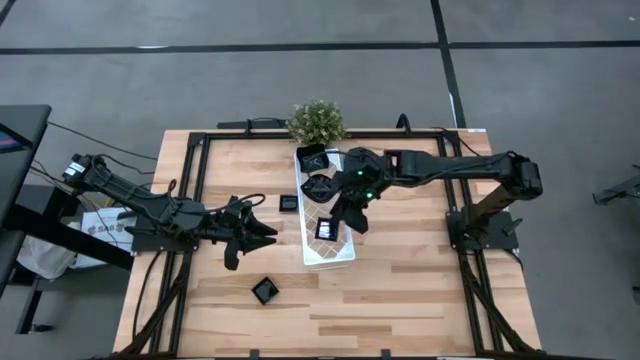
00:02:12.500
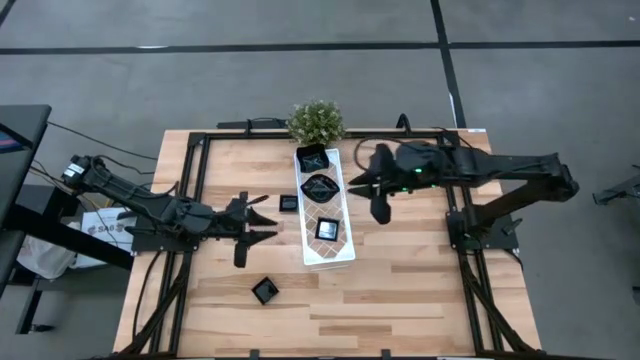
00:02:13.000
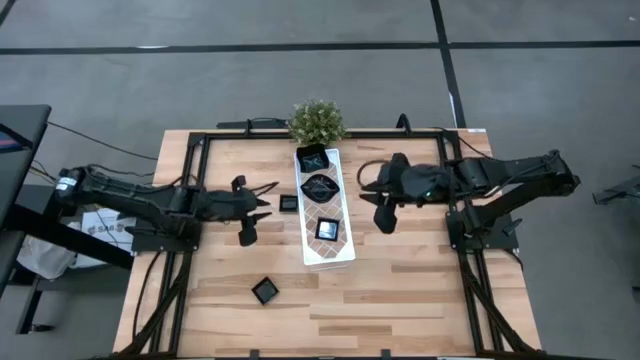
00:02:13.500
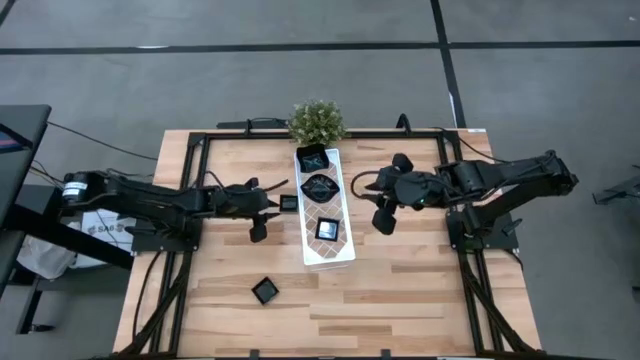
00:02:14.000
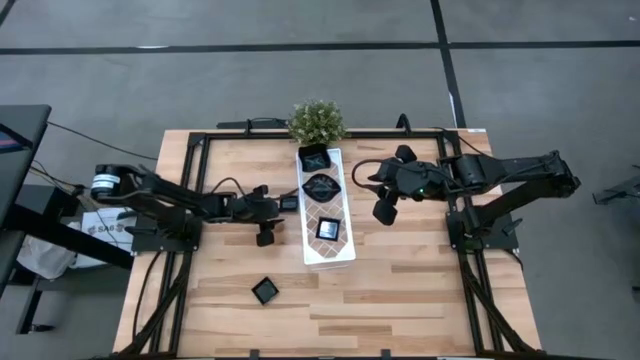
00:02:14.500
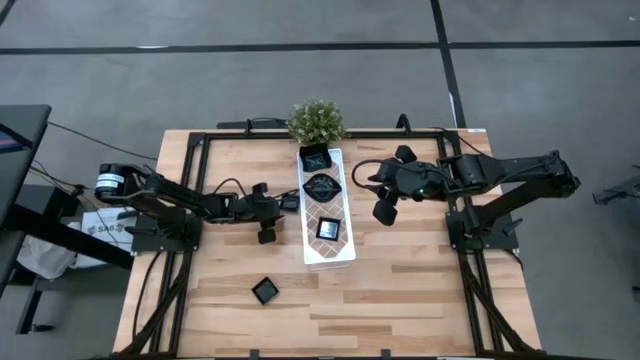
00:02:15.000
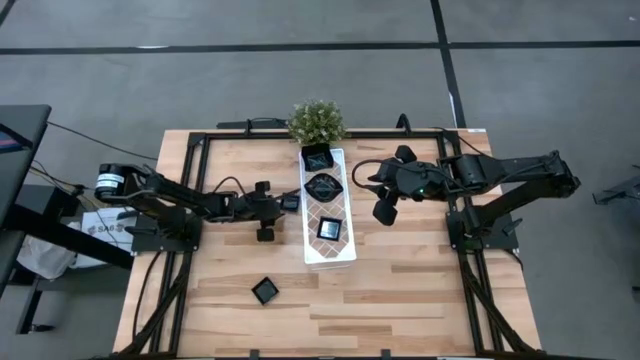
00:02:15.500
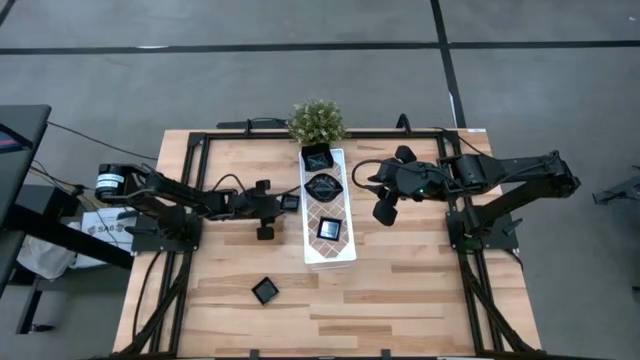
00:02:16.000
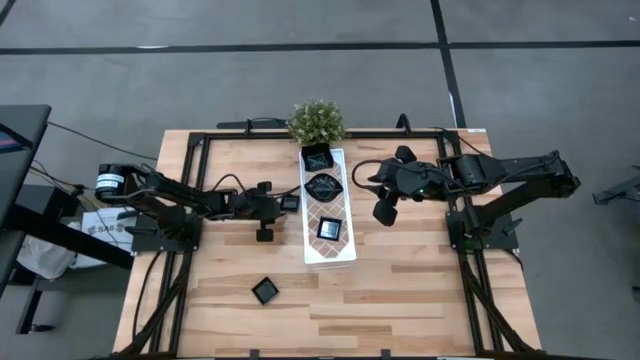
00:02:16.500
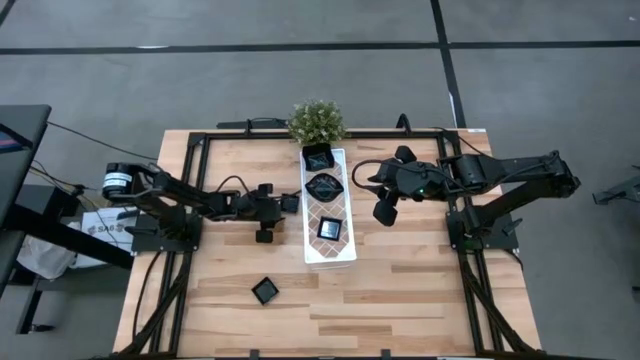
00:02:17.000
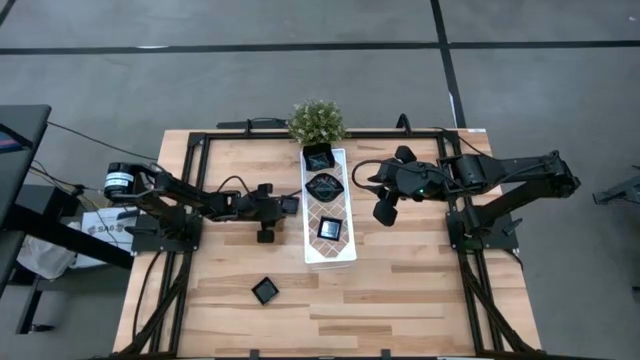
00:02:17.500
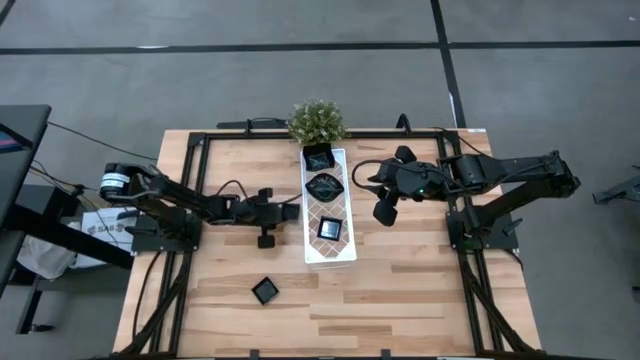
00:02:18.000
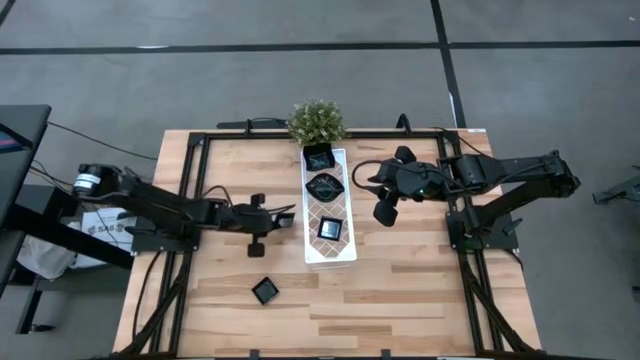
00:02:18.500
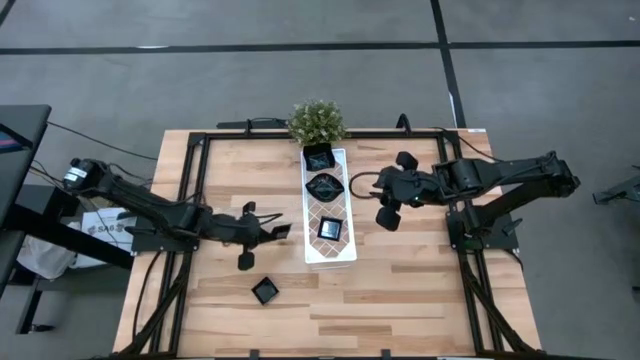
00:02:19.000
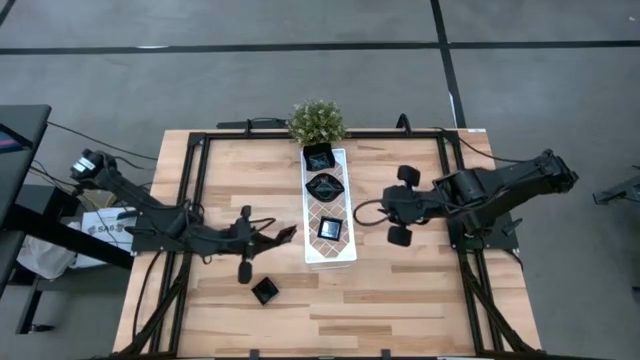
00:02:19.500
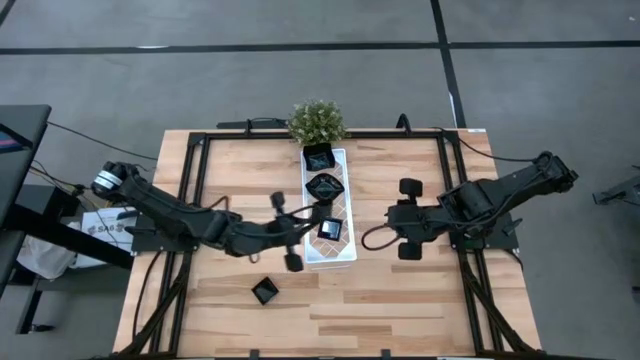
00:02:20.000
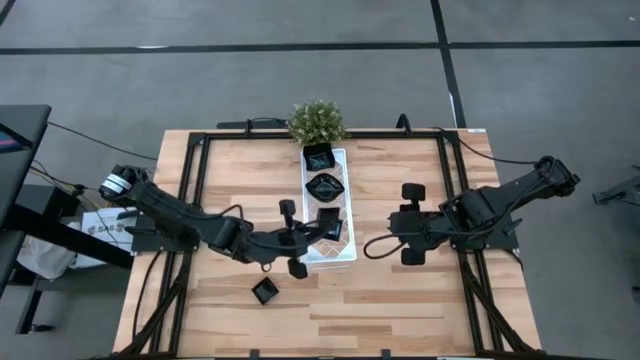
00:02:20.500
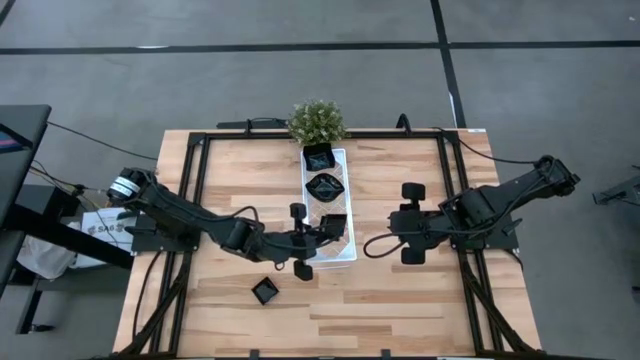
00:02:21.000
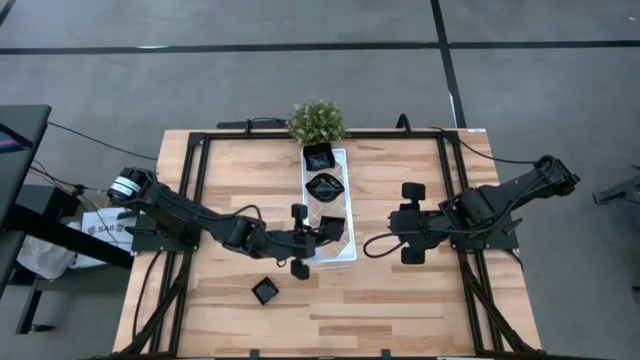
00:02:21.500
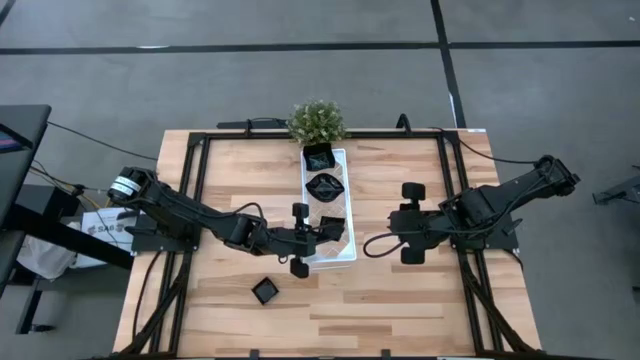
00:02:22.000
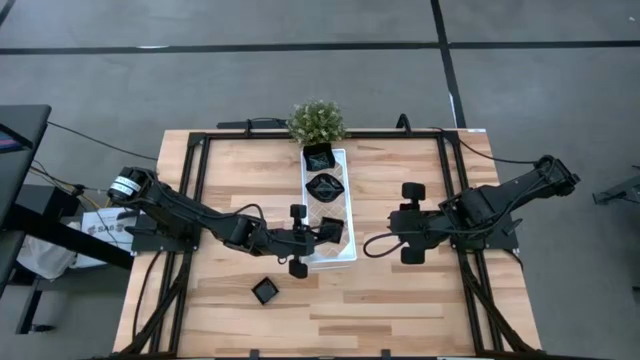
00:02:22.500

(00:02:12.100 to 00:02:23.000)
Task: Pick & Place Mini shaped plates
Stack the top square plate on the other square plate on the shelf

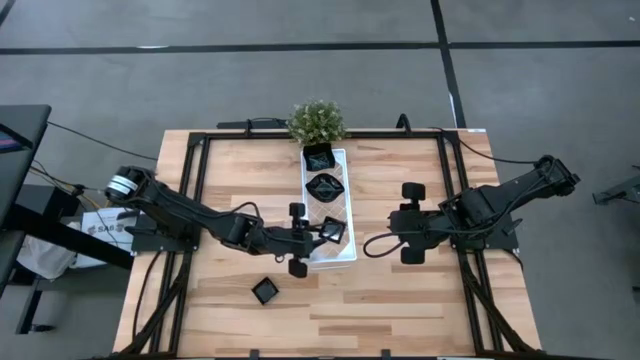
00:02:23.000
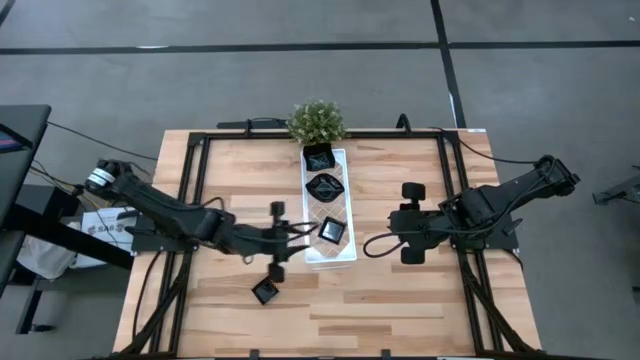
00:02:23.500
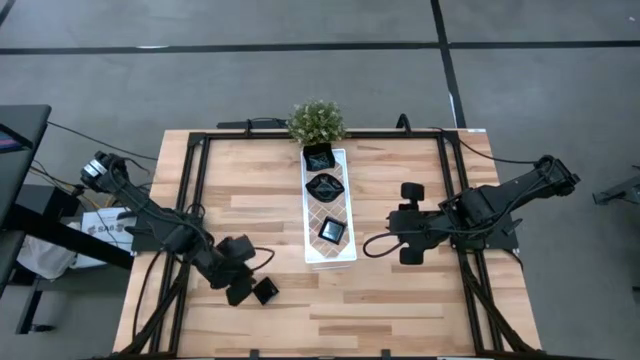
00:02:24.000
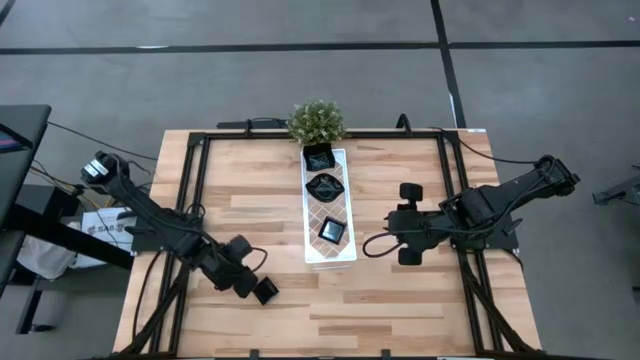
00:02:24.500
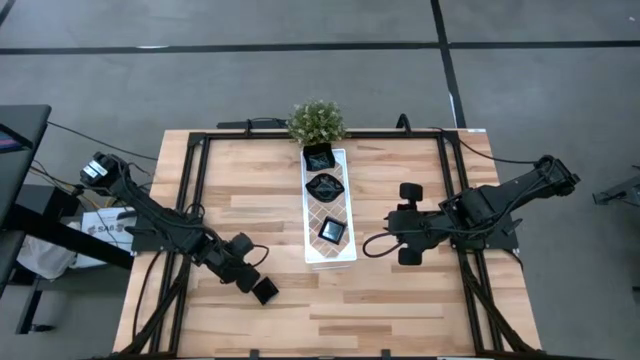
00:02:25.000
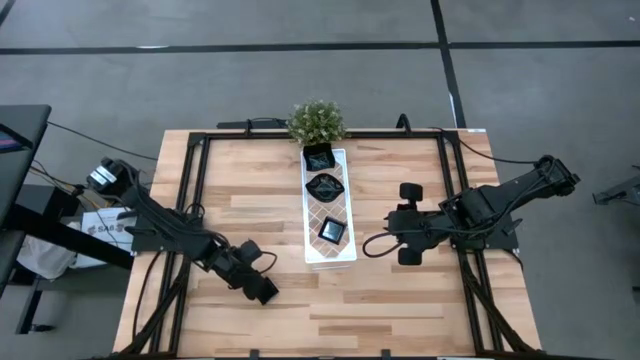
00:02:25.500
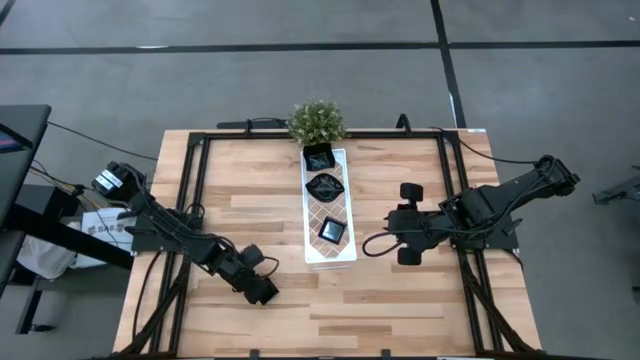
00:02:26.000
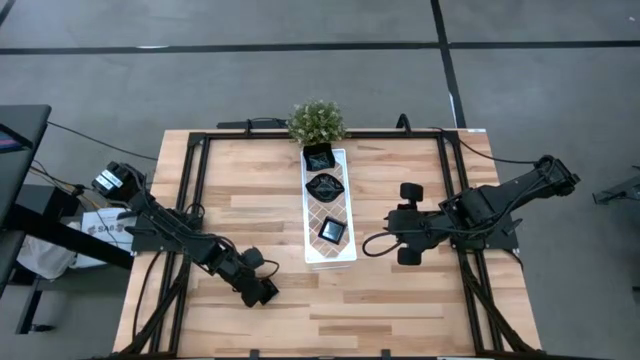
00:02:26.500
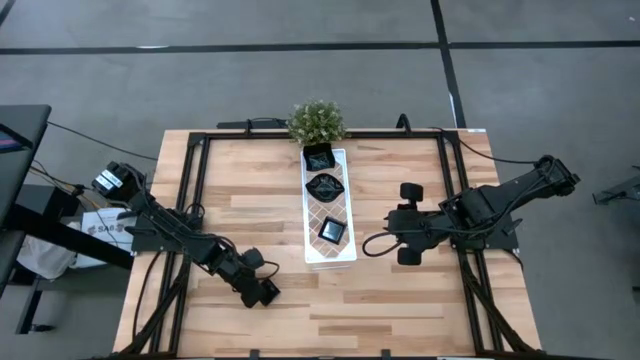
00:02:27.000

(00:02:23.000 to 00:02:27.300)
Stack the square plate on the other square plate on the shelf

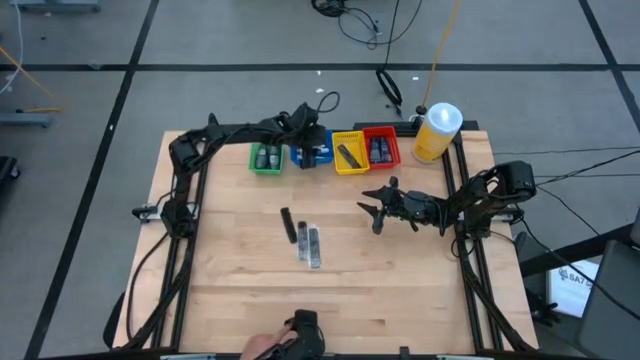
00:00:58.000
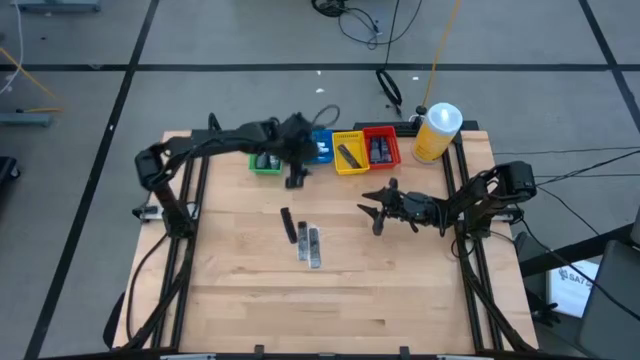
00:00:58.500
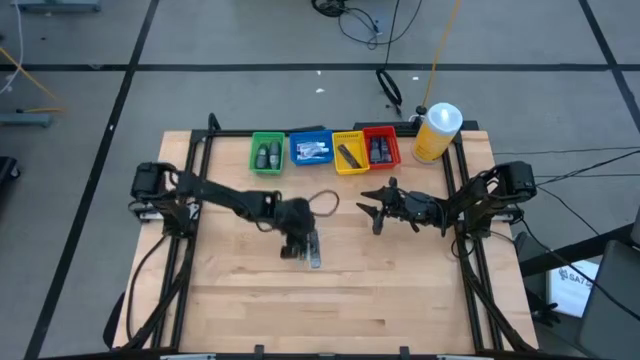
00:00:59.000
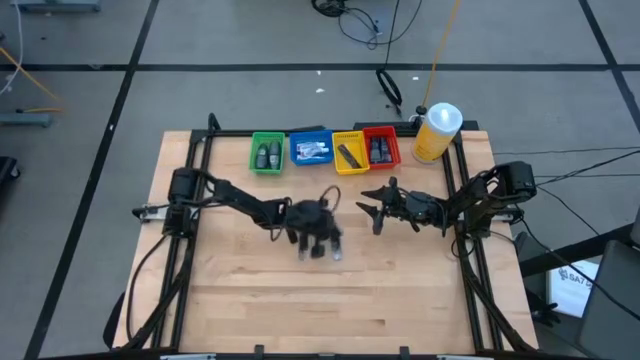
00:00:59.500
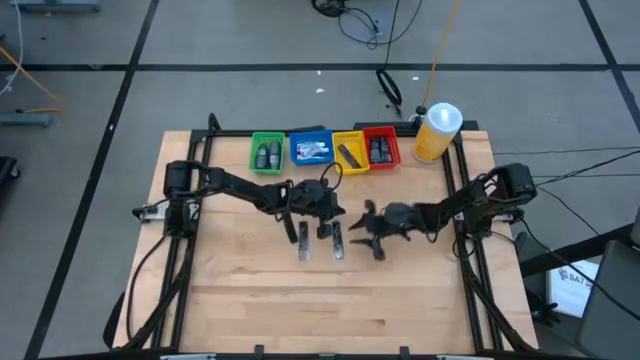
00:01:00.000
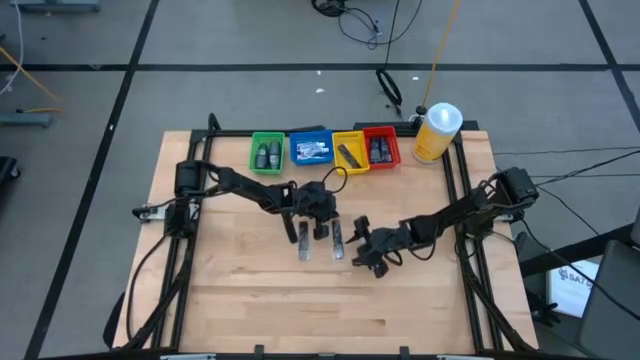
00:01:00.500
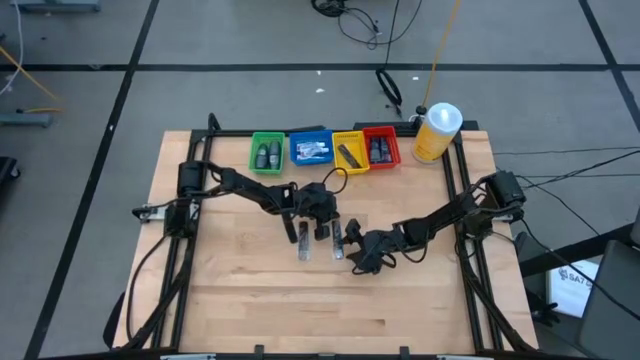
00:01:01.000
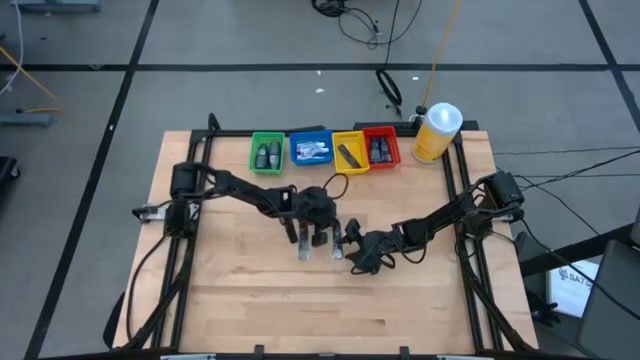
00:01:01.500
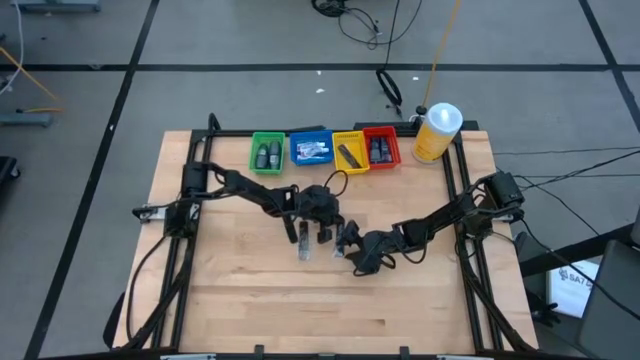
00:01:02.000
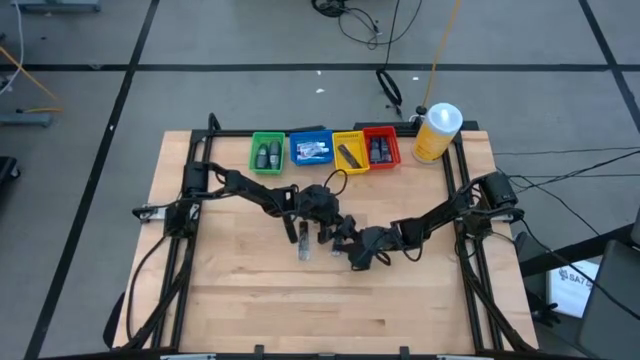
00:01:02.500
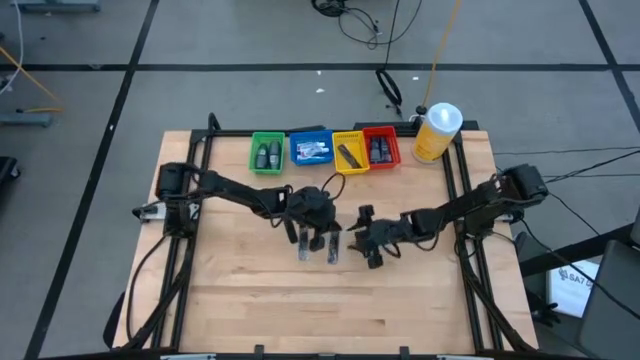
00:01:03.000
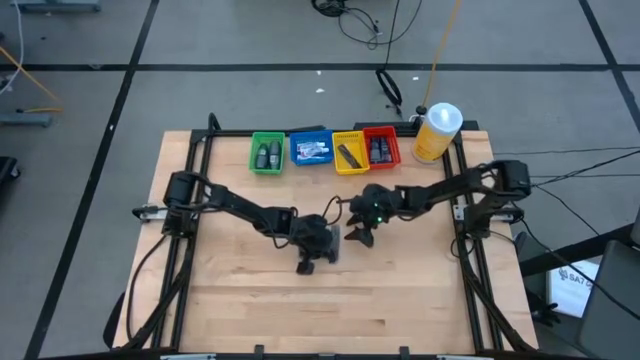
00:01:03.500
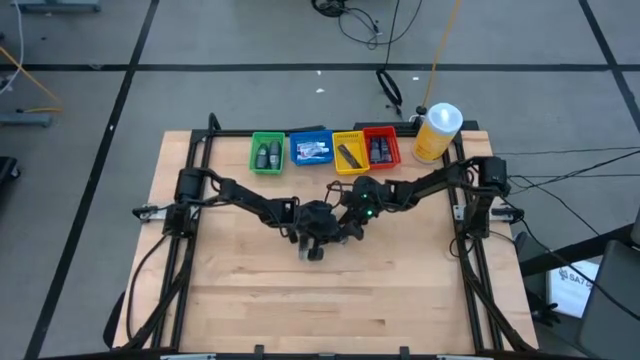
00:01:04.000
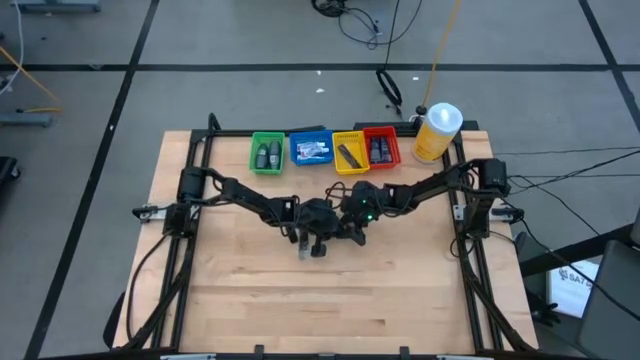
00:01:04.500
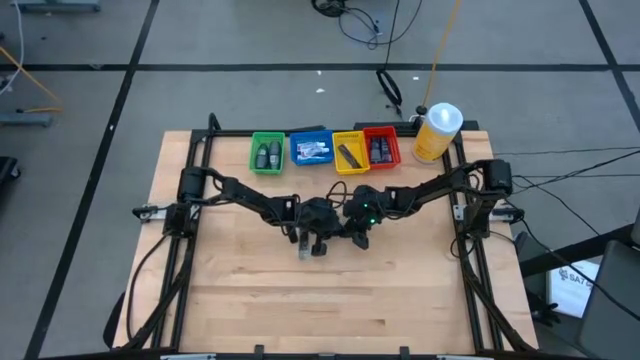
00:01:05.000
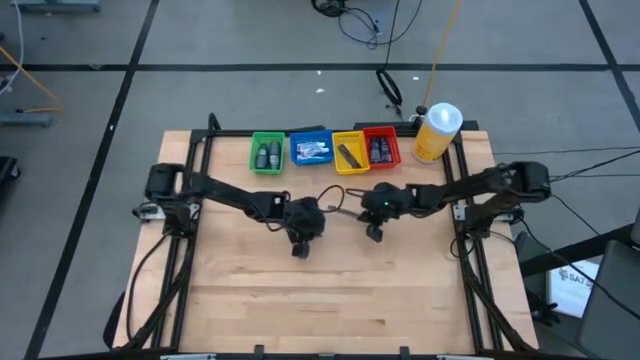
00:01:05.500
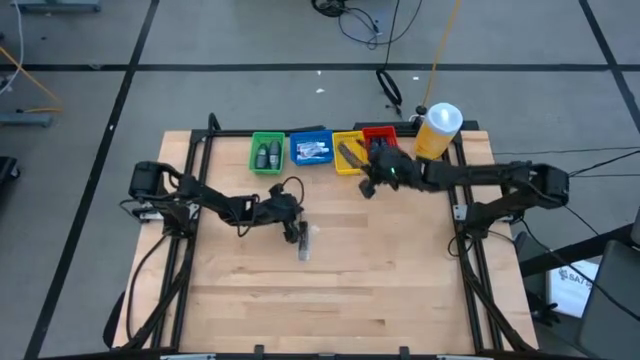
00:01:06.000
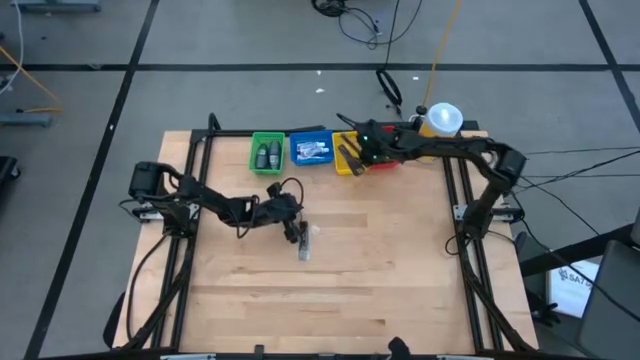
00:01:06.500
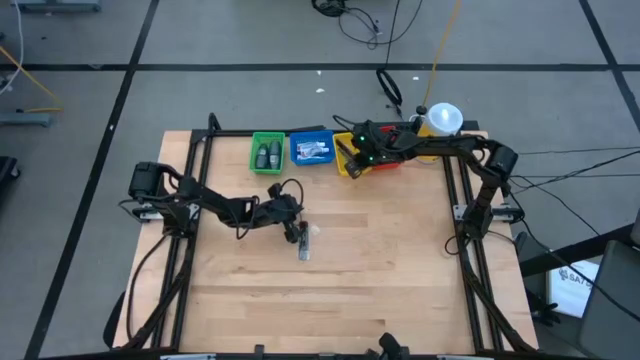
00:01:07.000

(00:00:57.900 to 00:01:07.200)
Task: Pick & Place Travel size toiletries
Put the right black comb into the yellow bin
